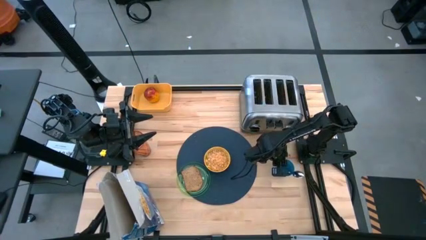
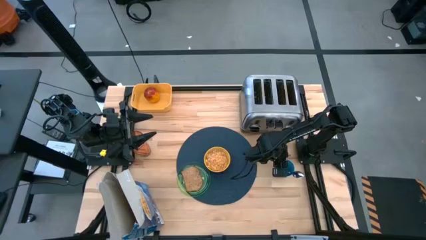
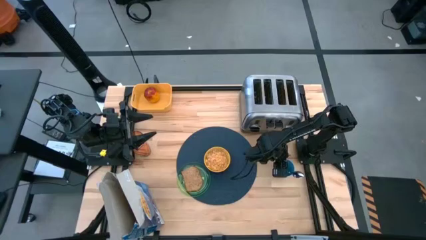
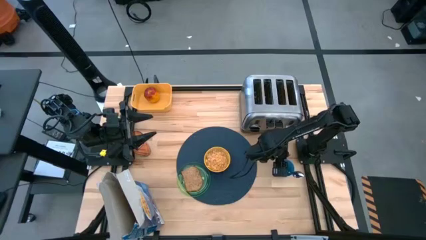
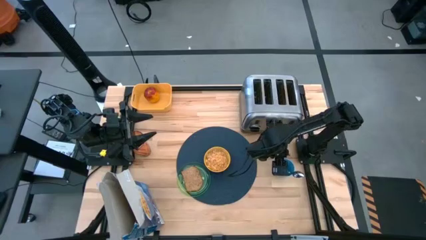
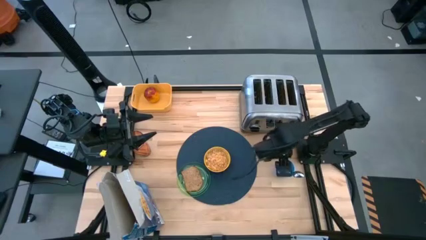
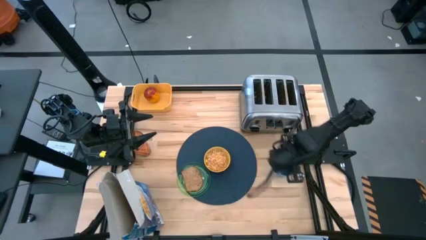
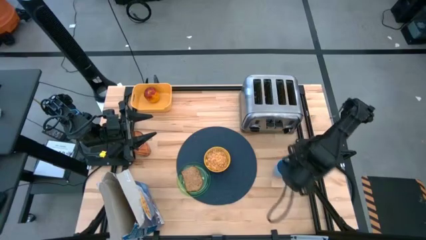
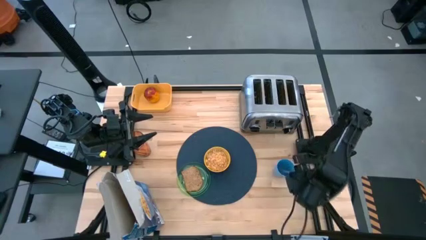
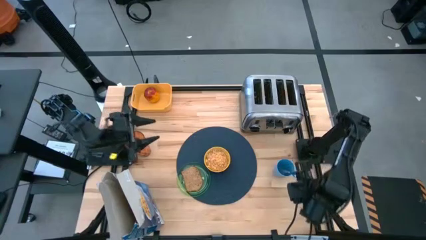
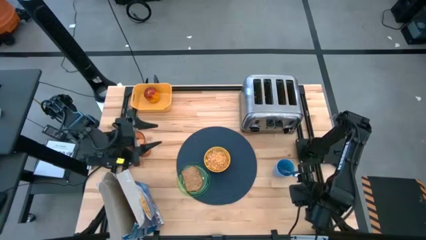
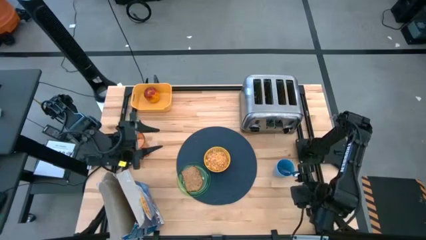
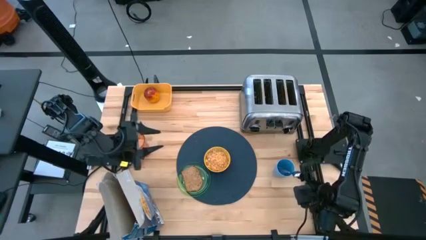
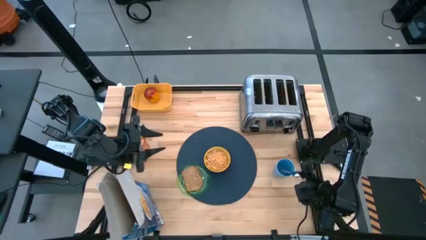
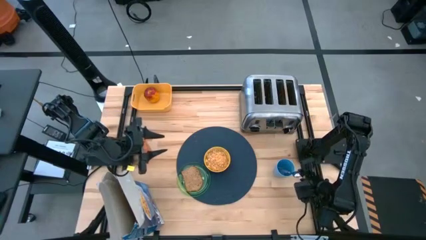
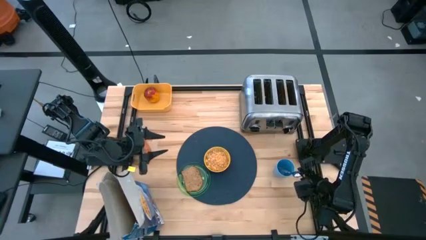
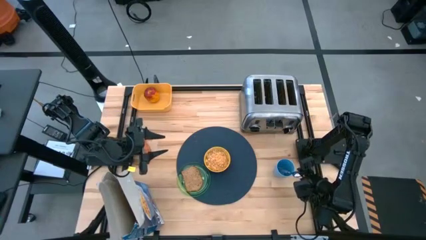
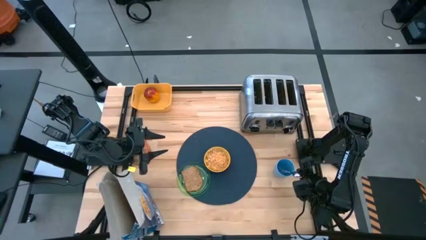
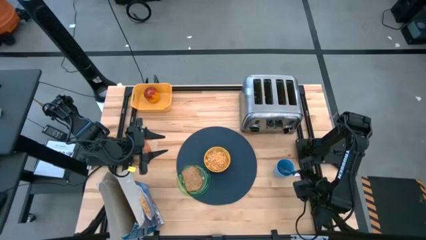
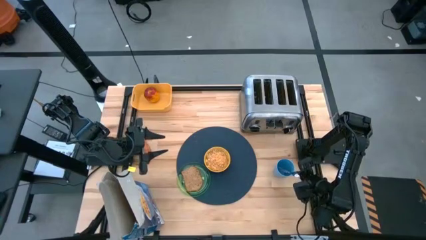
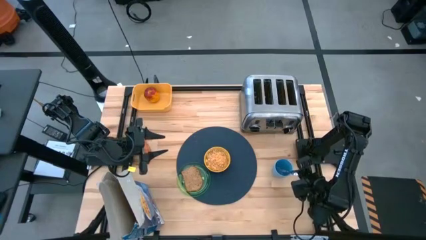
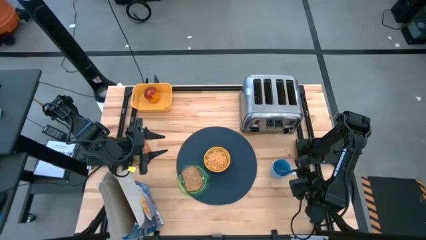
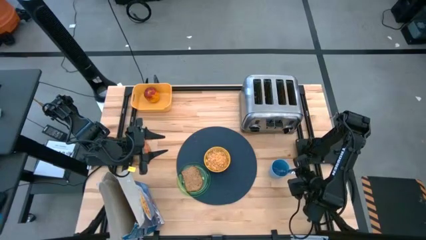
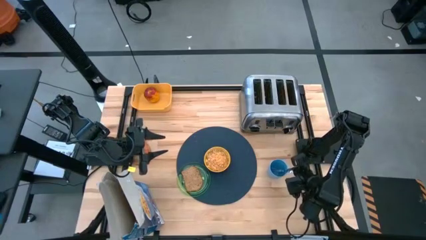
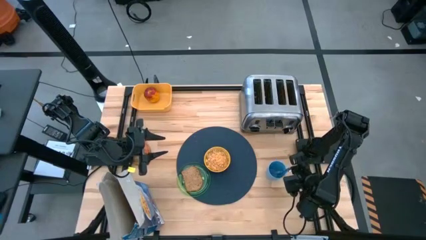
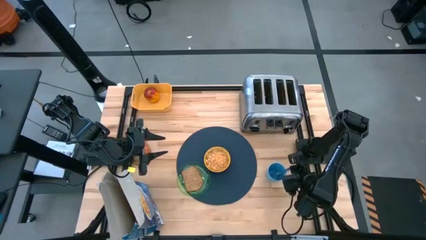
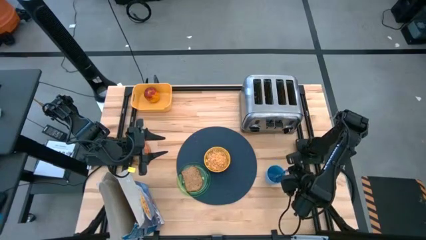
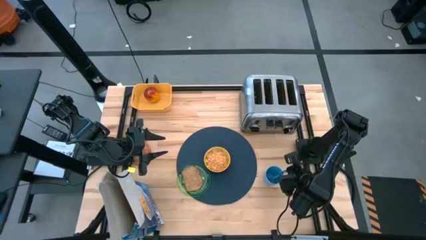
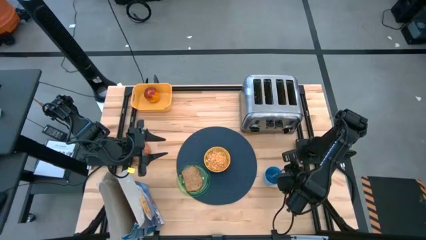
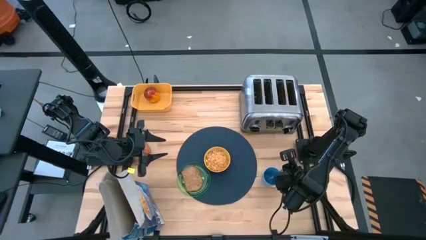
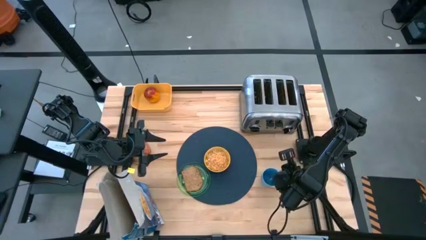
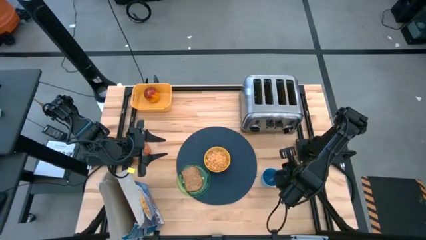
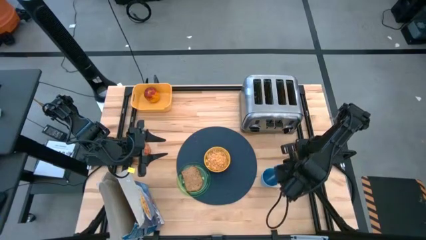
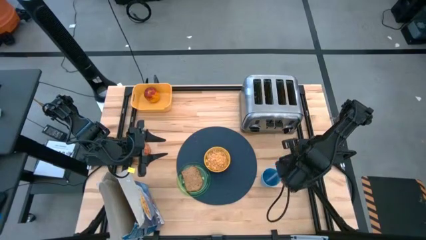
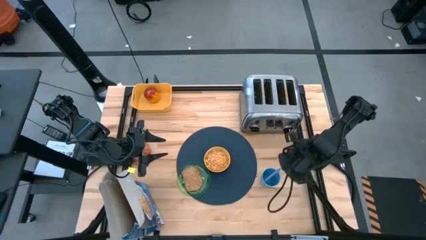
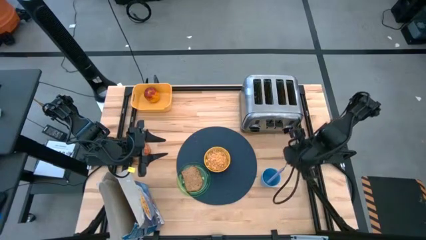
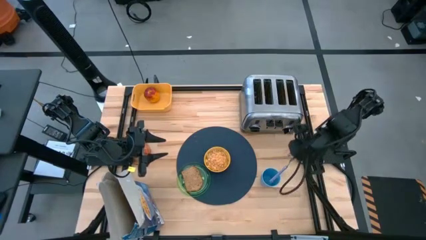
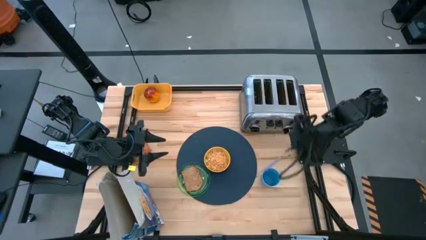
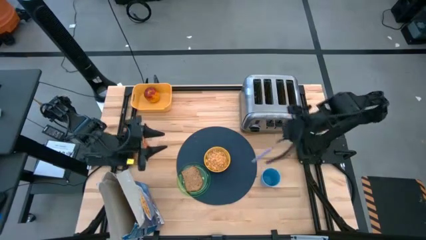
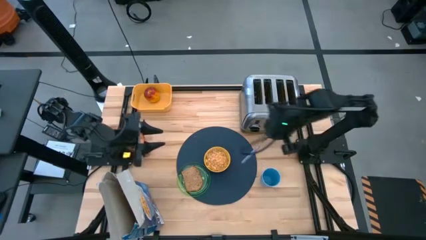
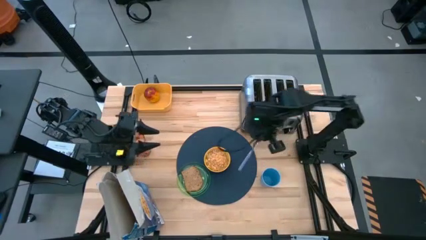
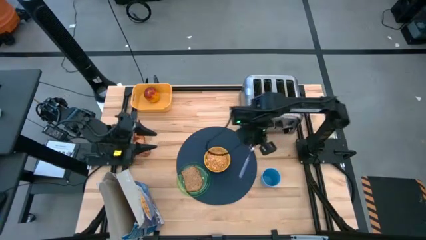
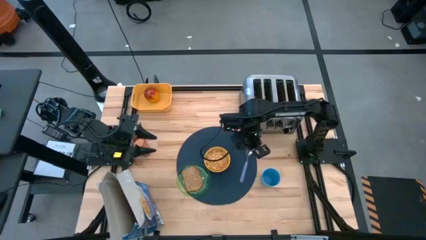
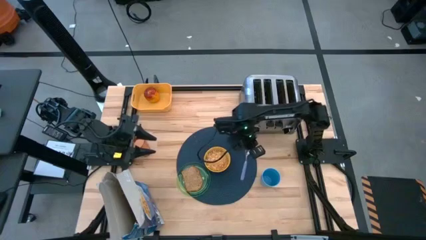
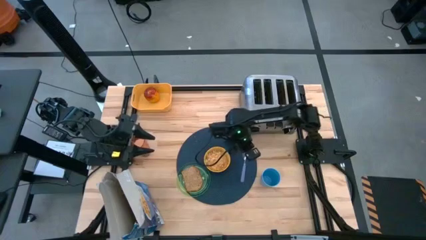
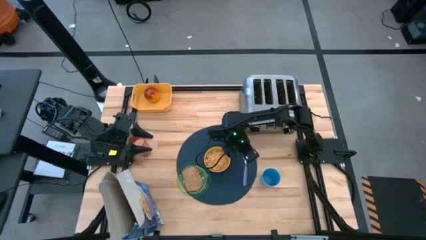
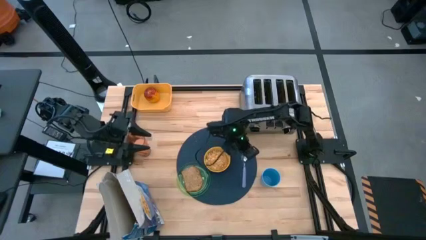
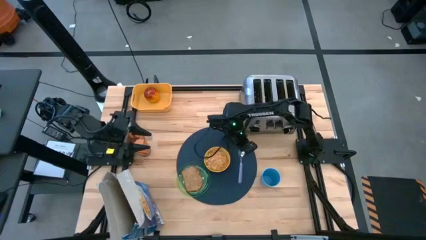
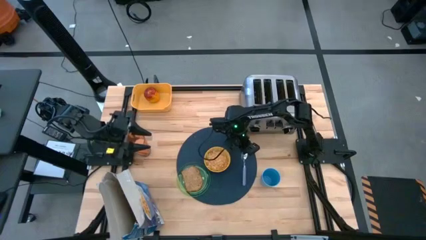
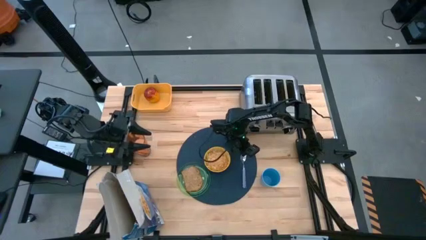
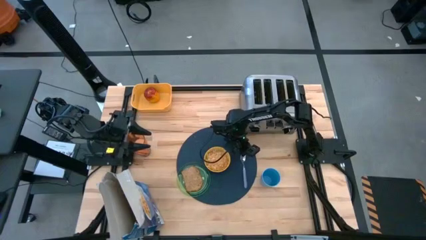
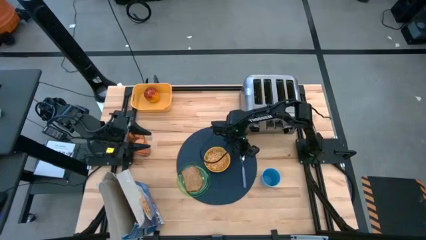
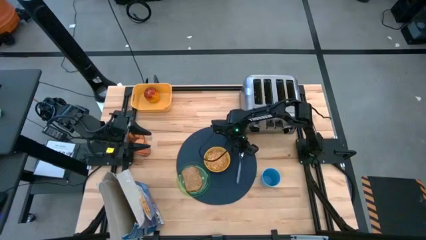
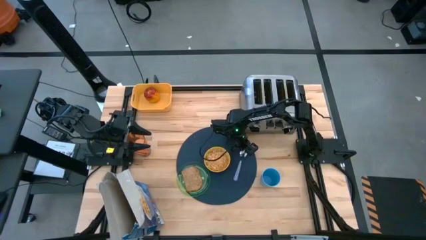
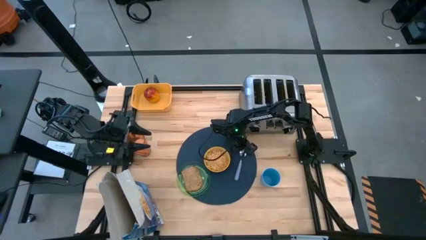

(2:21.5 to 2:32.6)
Task: Arrange a breakfast setting
Put the light dark blue spoon on the dark blue table mat to the left of the dark blue cup

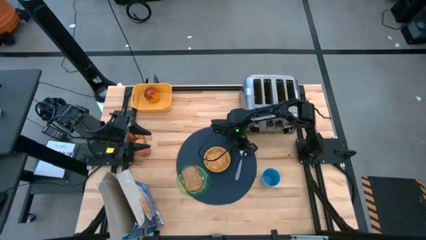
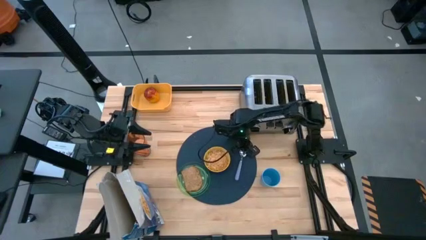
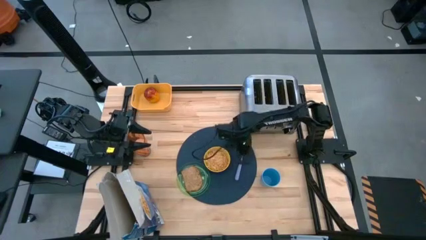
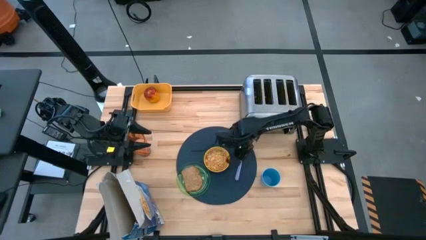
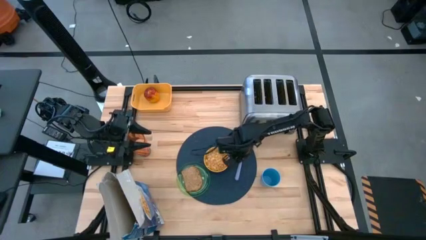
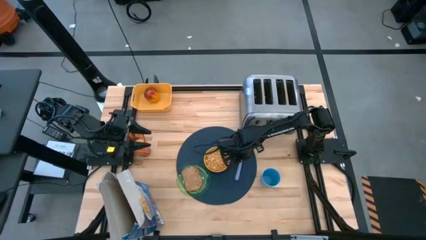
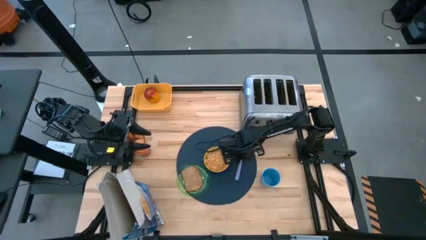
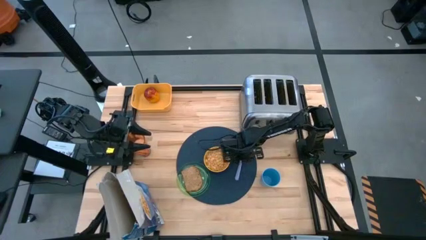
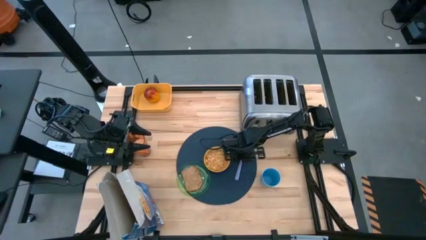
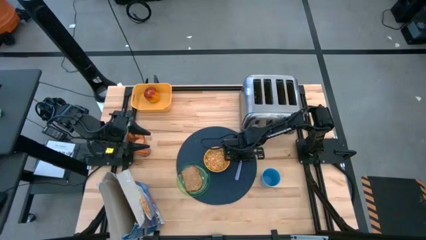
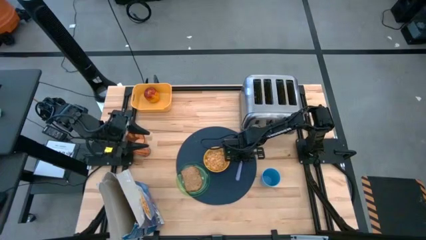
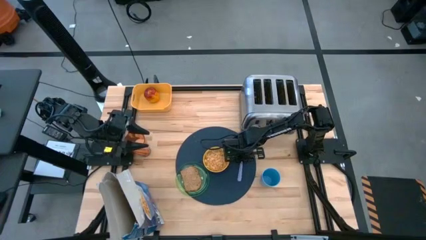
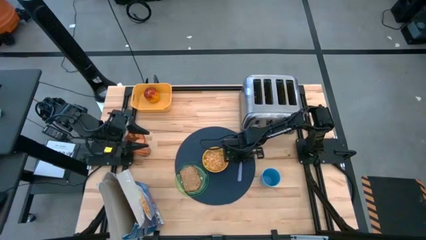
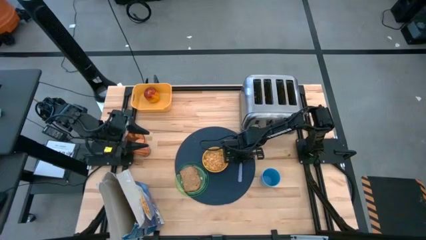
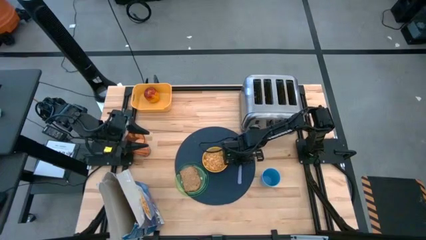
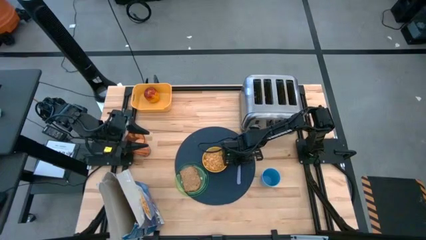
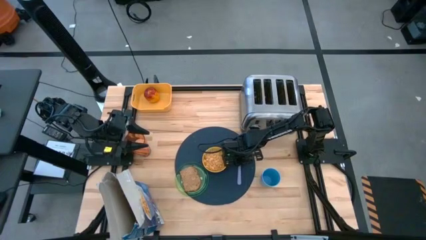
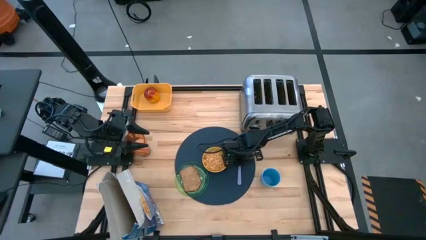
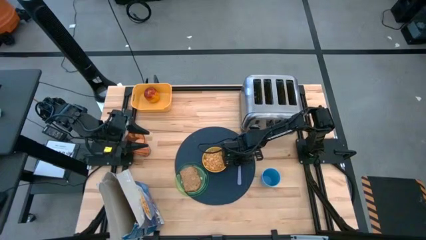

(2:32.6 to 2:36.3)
Adjust the spoon
